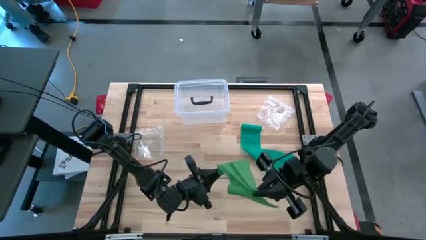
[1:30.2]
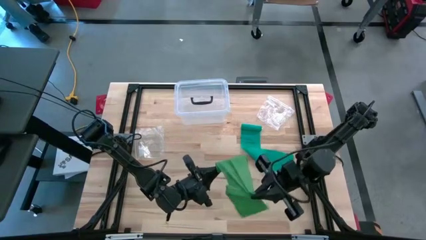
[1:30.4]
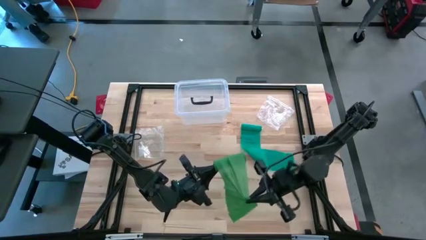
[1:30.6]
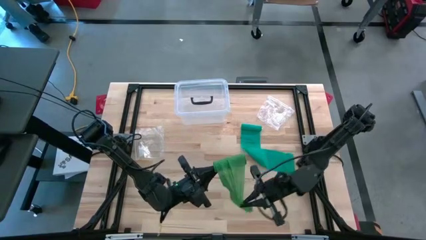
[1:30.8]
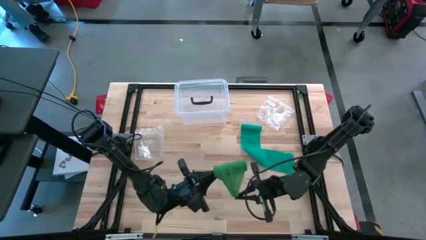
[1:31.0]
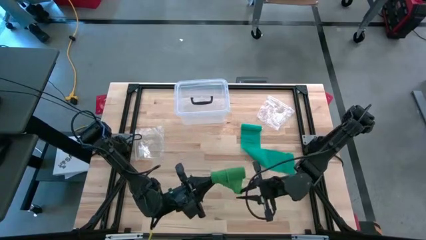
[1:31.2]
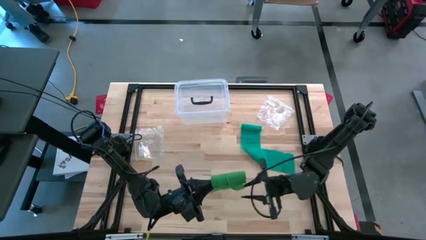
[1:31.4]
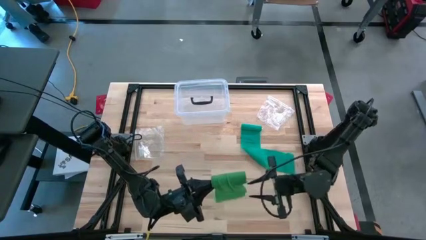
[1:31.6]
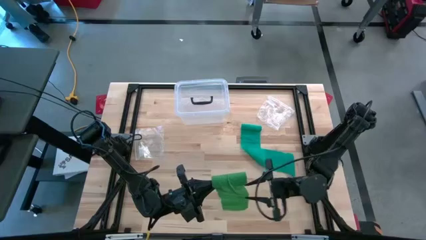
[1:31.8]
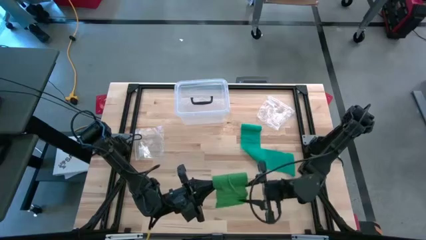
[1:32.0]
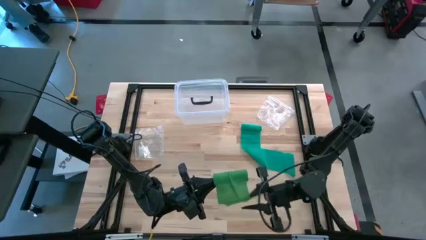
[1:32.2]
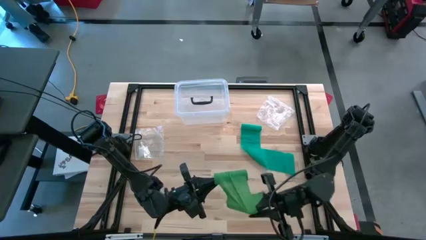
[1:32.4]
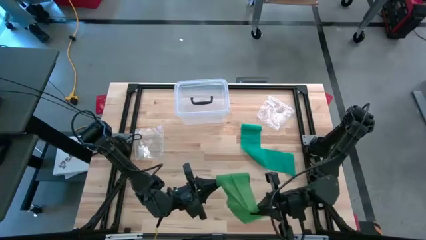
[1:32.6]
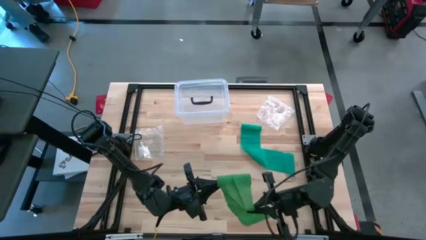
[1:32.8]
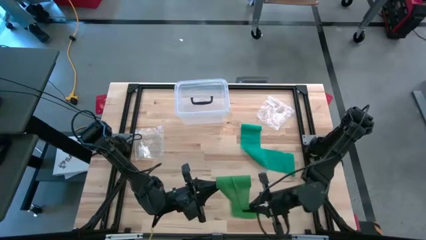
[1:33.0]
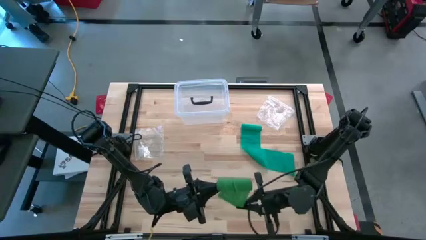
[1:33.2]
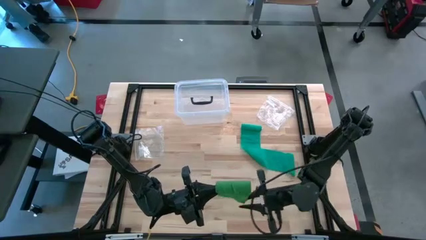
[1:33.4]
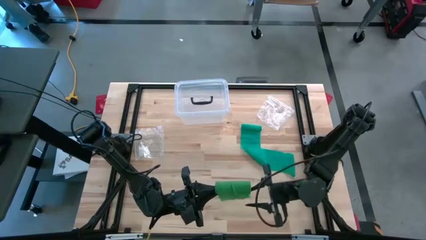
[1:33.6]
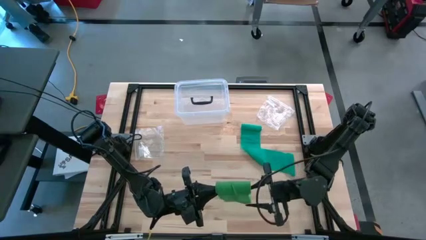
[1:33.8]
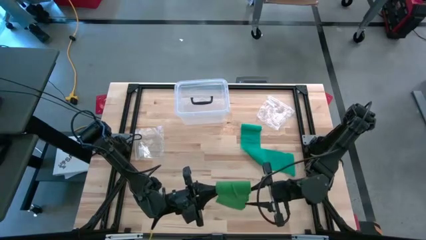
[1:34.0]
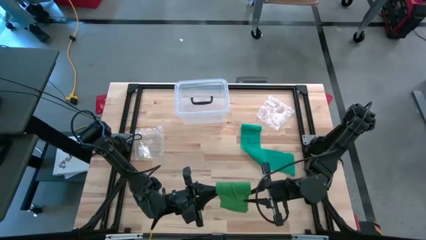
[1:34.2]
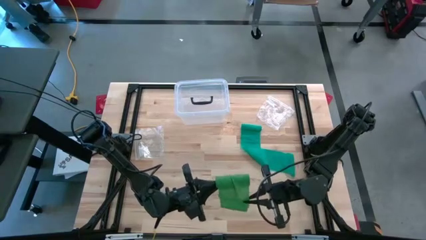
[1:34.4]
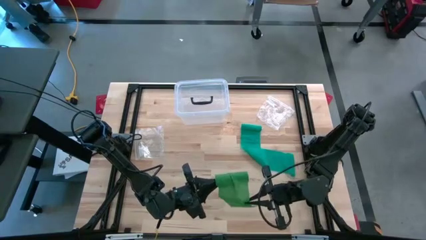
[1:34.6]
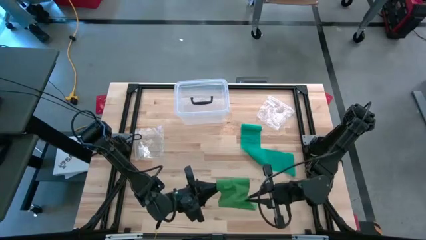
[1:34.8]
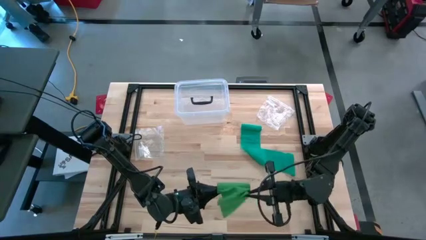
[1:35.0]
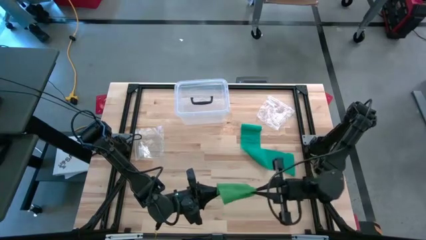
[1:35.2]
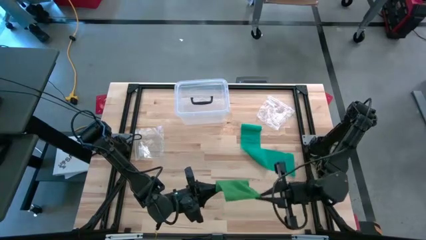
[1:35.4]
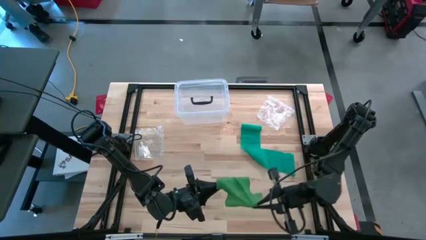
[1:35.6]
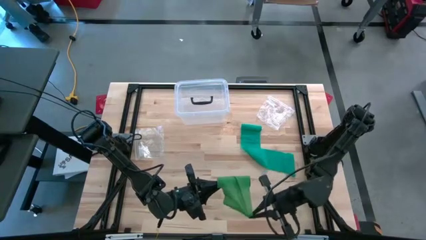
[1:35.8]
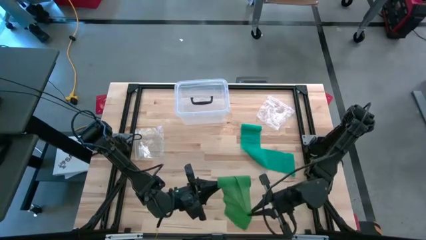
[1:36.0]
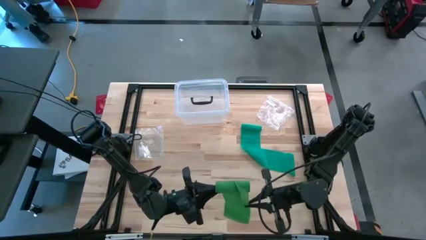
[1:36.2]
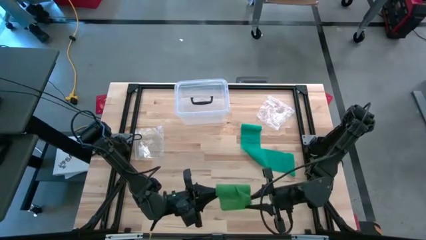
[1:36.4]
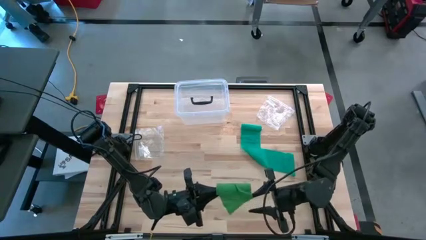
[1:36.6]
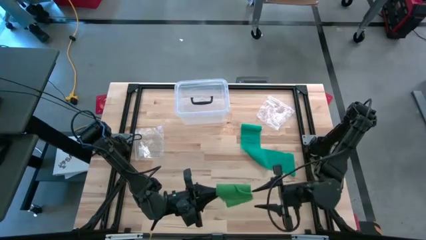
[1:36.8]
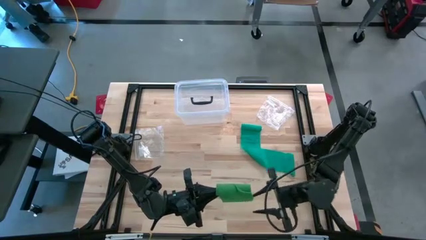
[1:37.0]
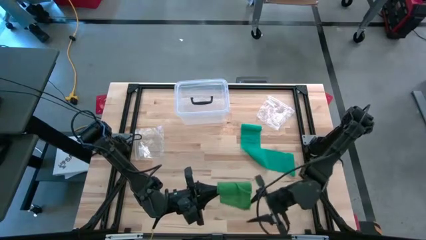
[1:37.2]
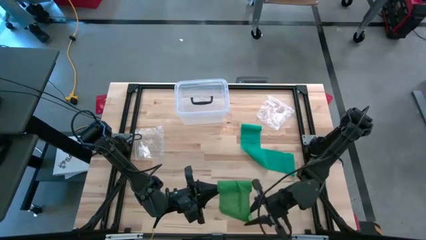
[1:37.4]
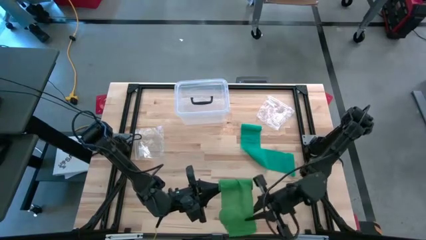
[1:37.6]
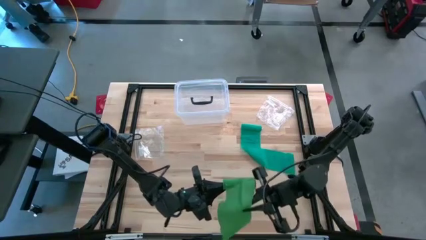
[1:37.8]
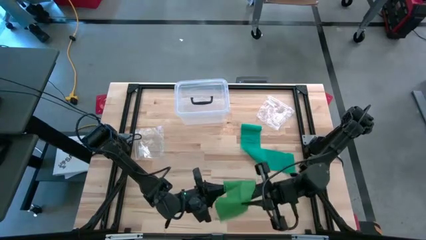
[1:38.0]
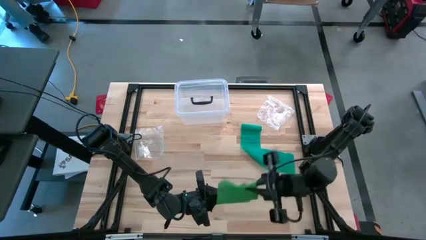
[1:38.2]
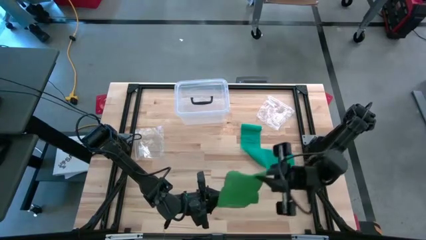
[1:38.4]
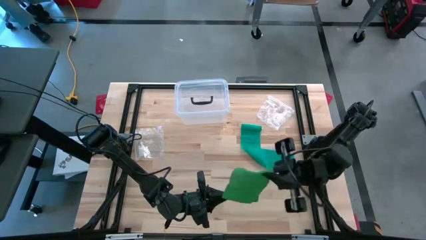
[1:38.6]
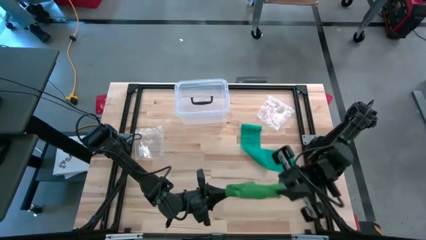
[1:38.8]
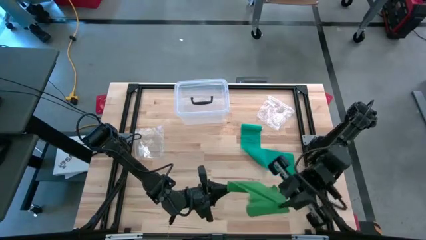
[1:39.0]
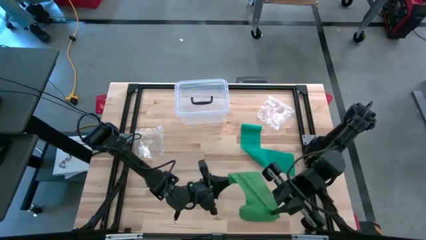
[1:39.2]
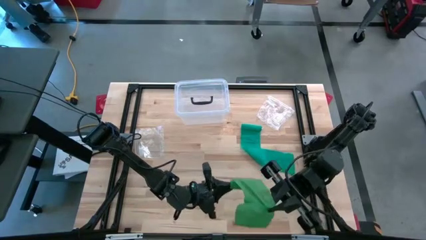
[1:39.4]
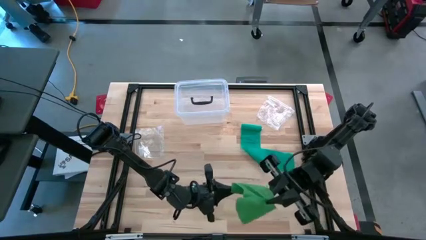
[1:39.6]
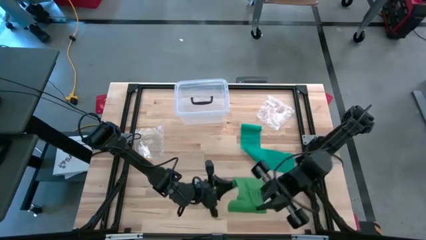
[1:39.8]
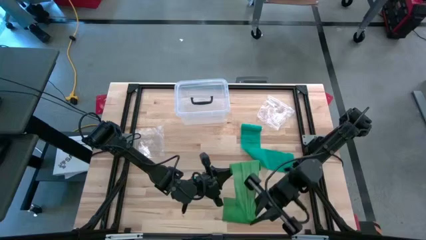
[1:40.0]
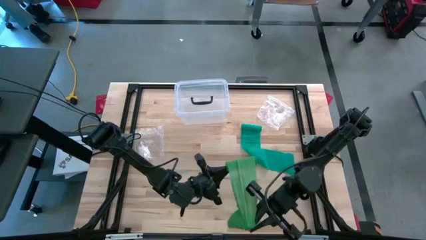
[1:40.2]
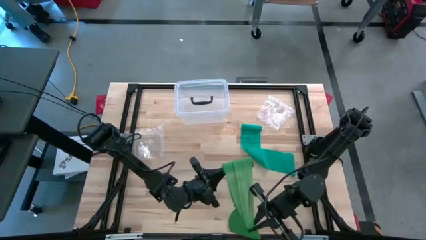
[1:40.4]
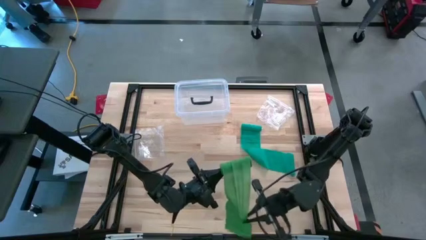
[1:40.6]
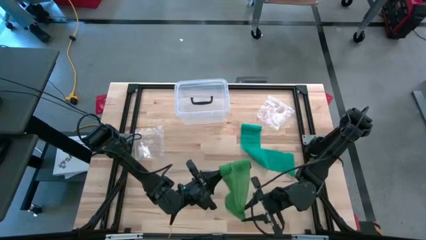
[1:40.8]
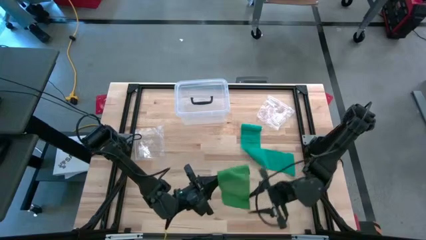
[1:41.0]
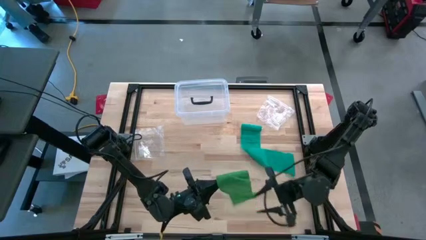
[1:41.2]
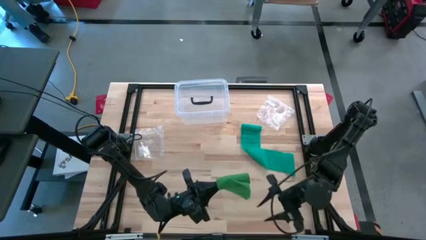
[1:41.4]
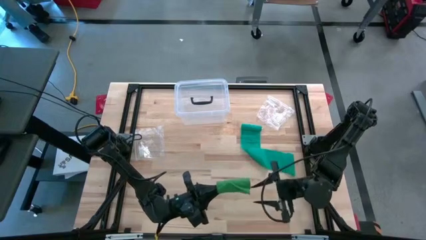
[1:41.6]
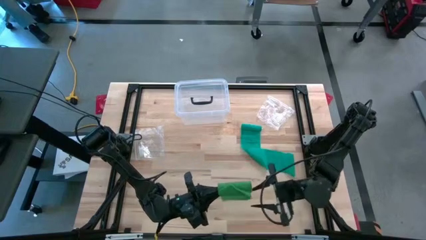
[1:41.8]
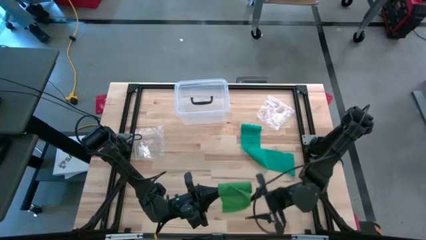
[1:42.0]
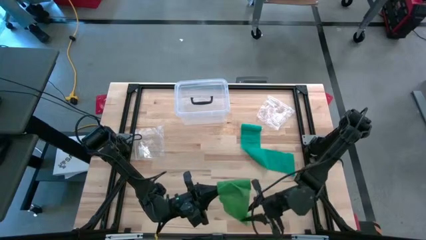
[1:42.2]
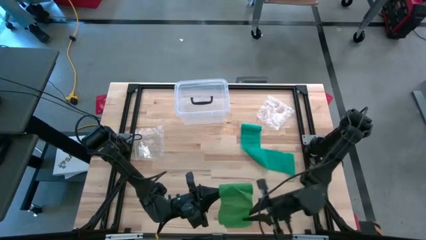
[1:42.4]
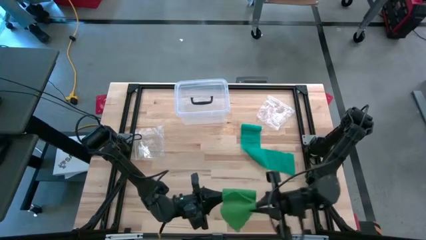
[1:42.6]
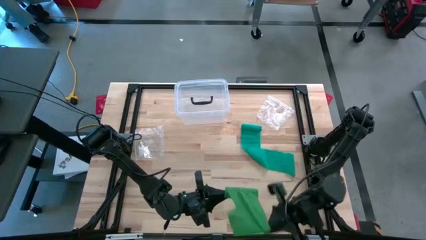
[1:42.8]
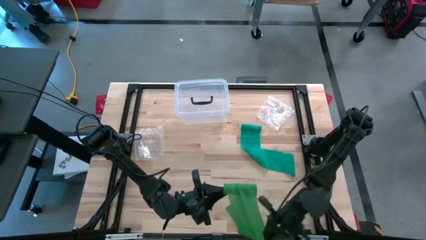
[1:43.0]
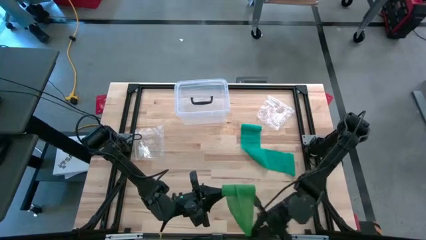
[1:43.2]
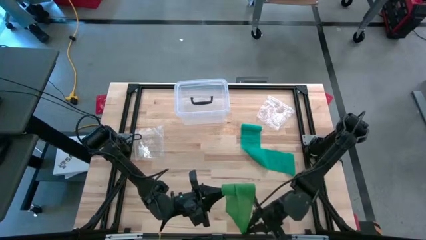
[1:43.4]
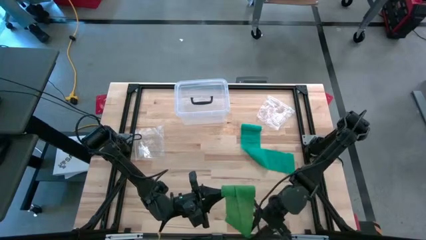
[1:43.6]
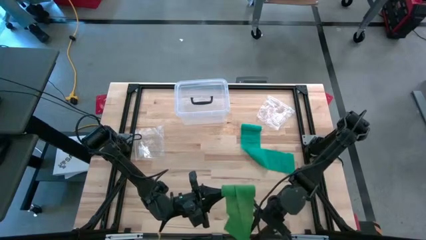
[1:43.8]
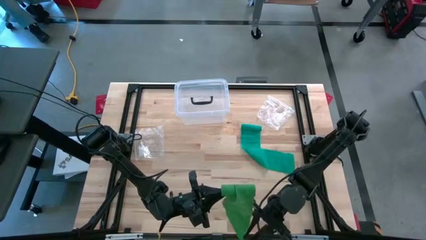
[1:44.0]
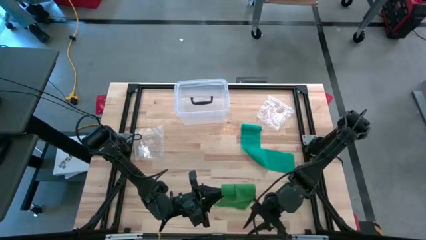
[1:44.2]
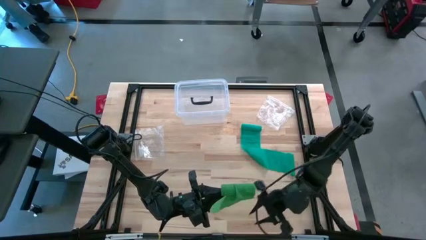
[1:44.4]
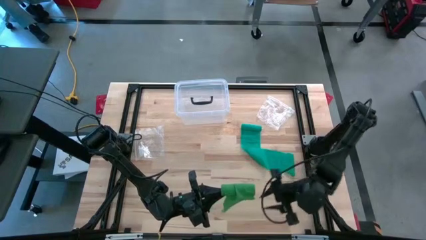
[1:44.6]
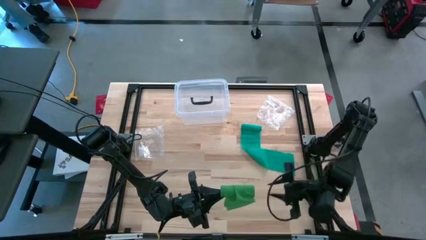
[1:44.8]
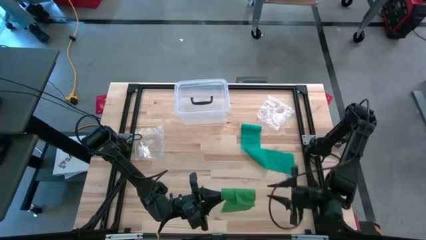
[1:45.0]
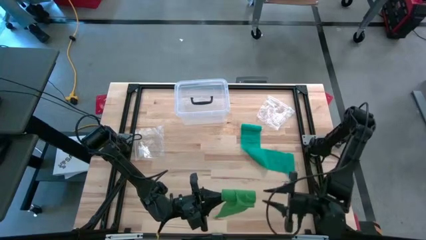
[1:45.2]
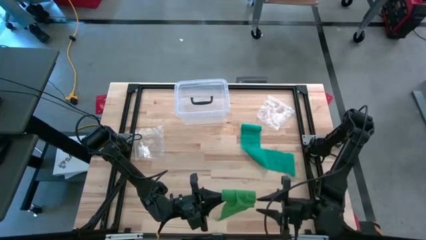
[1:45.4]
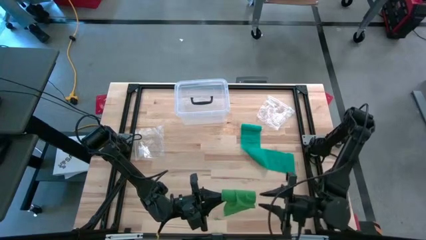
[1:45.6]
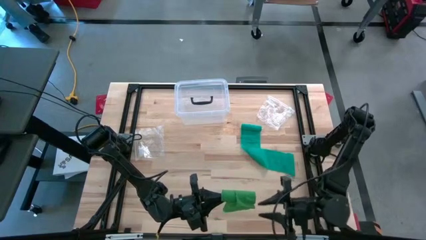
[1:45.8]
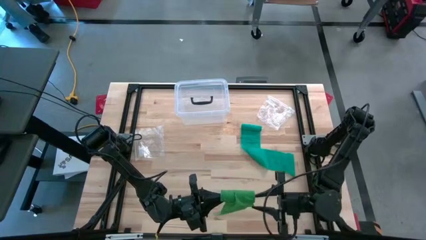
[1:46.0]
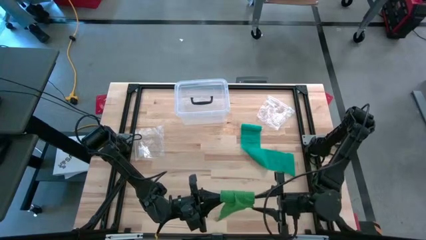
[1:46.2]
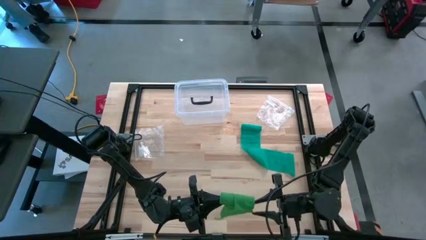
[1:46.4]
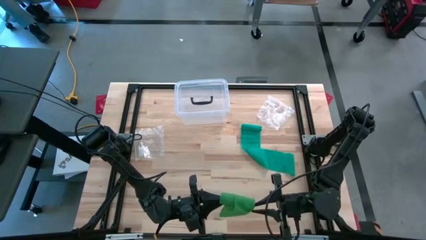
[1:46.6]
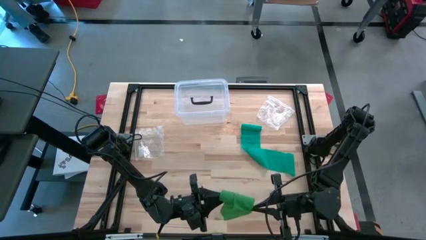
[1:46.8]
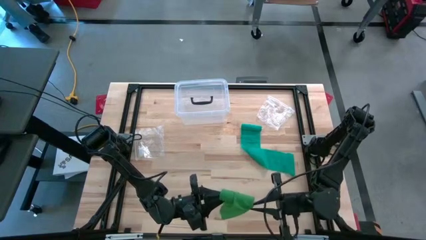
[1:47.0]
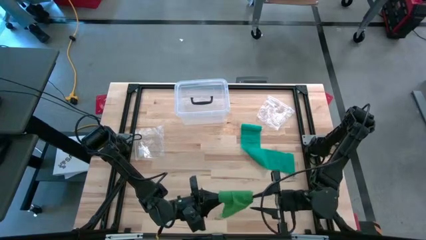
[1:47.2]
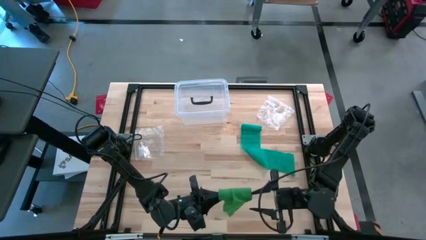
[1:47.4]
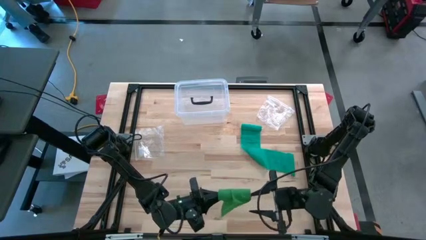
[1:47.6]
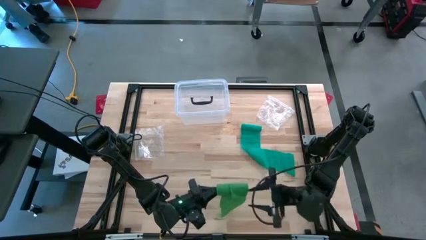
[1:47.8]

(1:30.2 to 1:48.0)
Task: Roll bandage
Roll the green bandage
